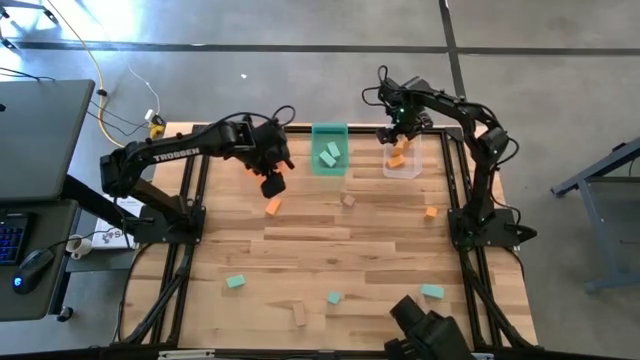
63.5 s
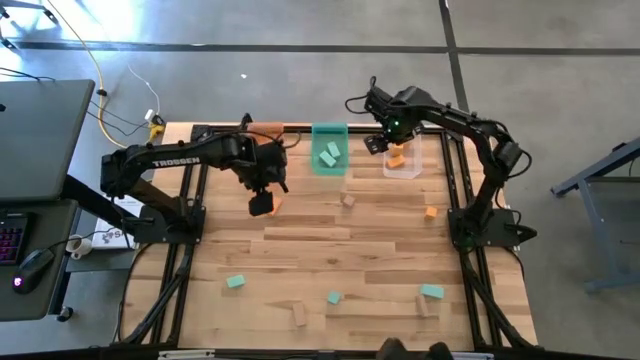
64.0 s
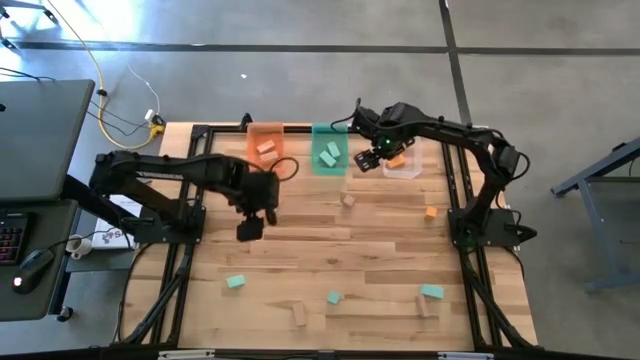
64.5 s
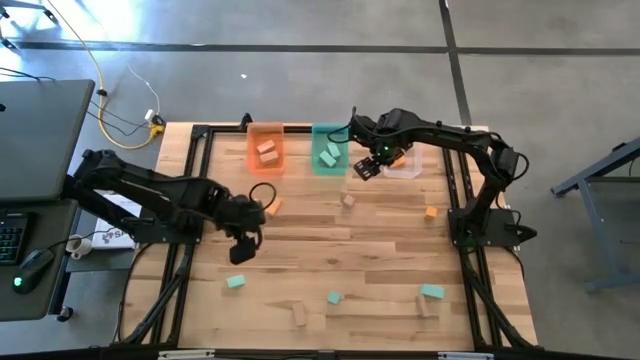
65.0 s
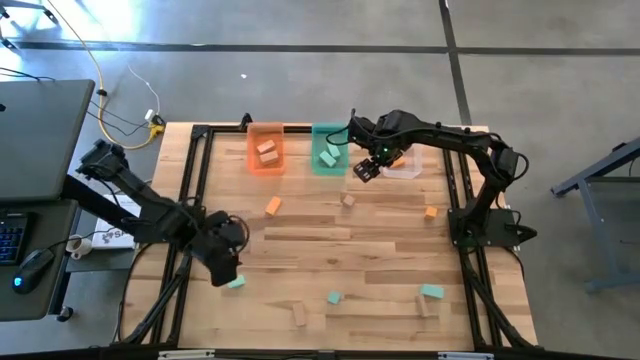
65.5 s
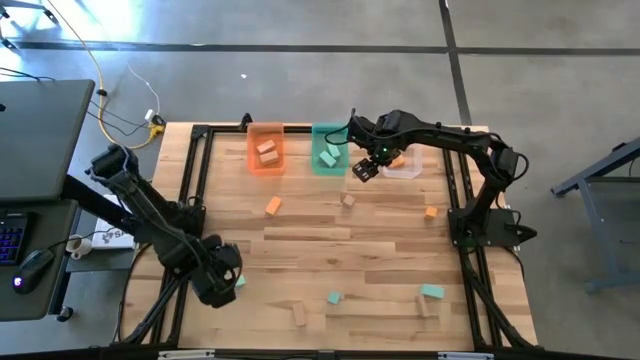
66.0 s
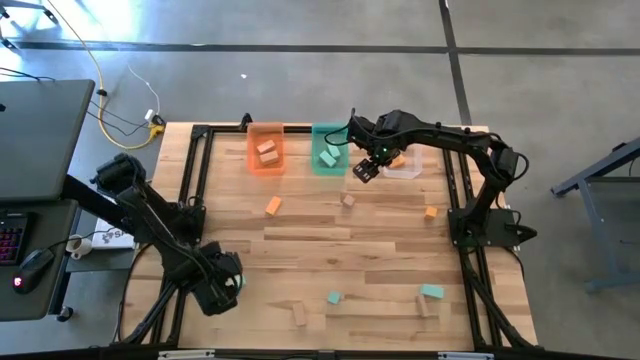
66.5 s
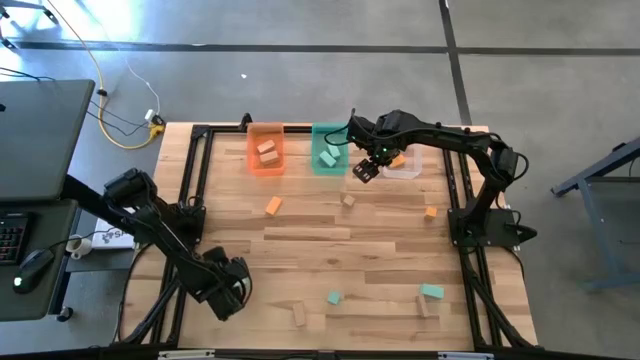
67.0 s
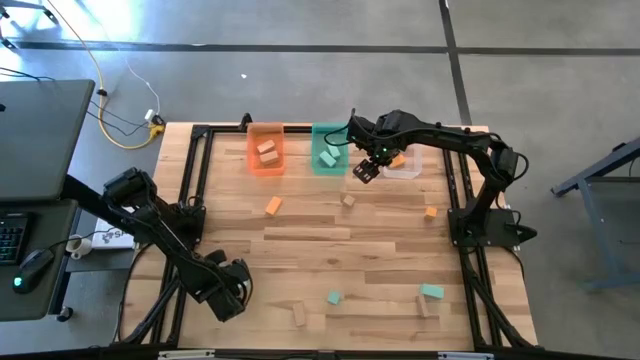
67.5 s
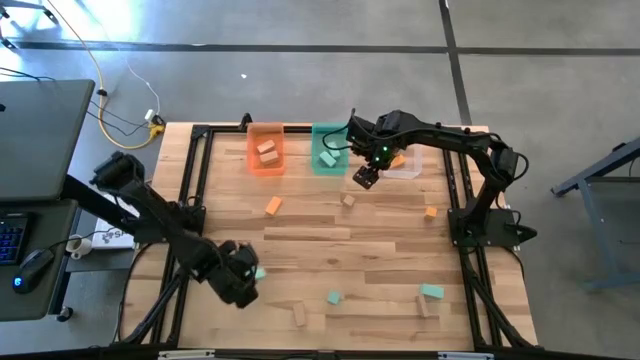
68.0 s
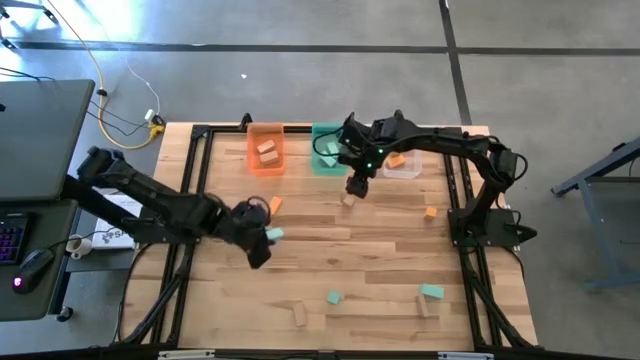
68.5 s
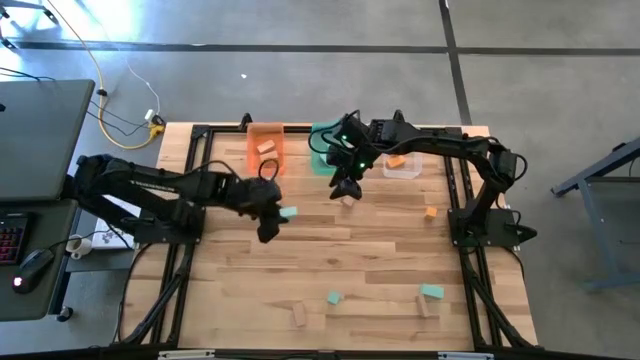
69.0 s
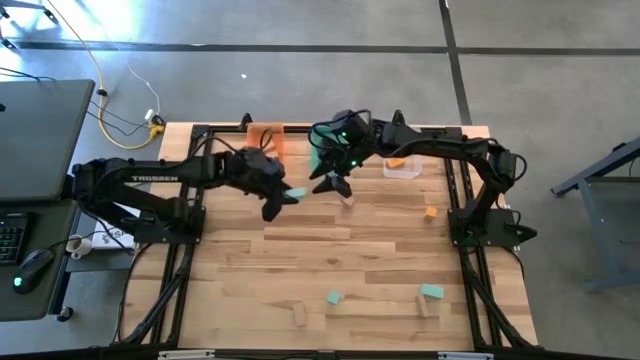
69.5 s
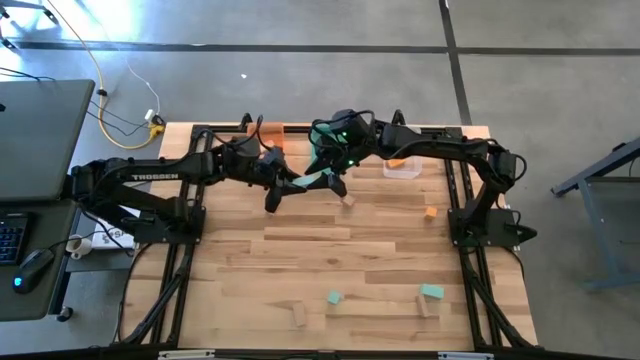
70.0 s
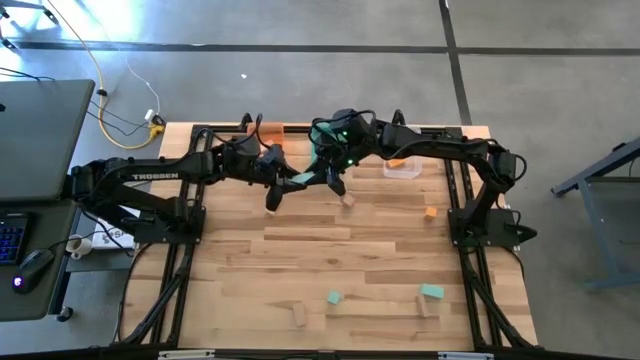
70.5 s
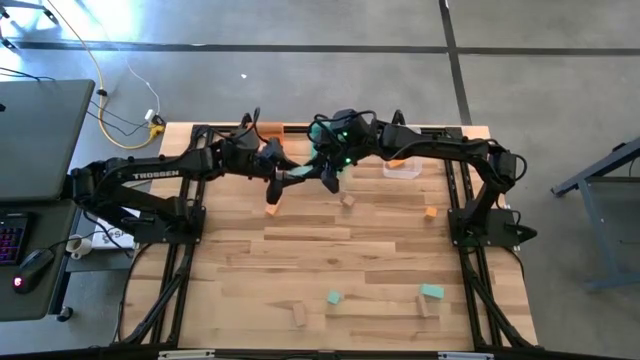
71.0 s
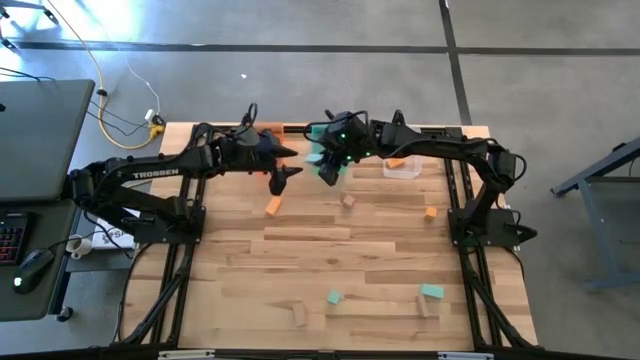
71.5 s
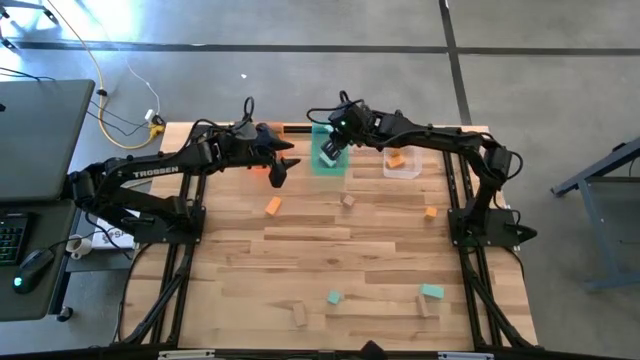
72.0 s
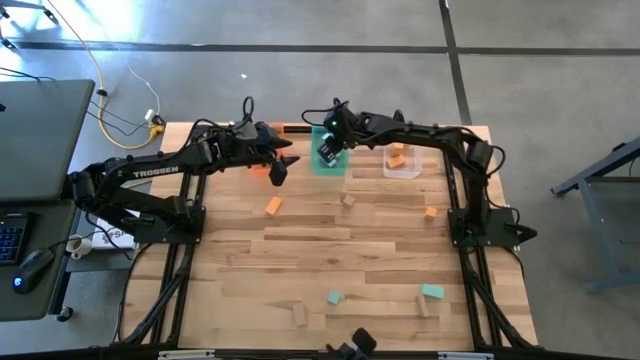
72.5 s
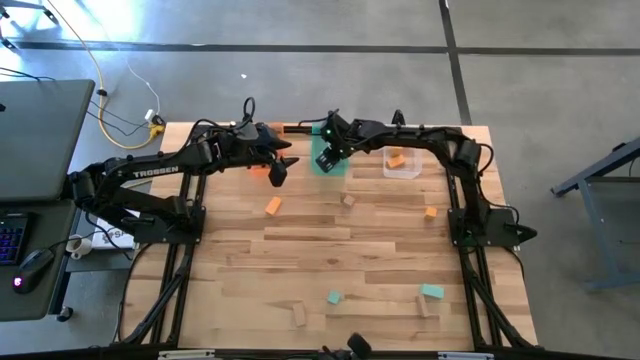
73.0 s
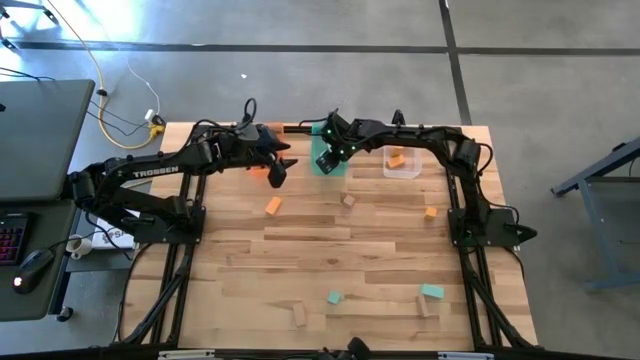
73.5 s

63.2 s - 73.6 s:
Task: Sort & place blocks by color
Put the blue block into the blue bin

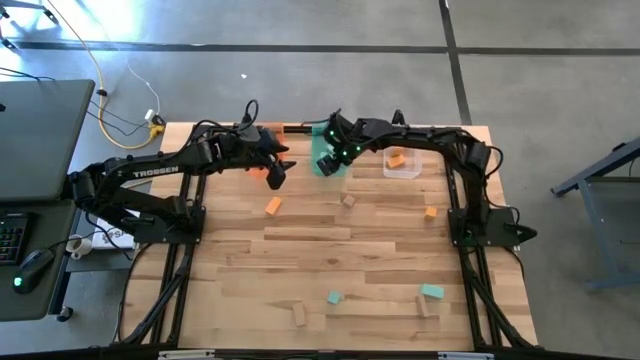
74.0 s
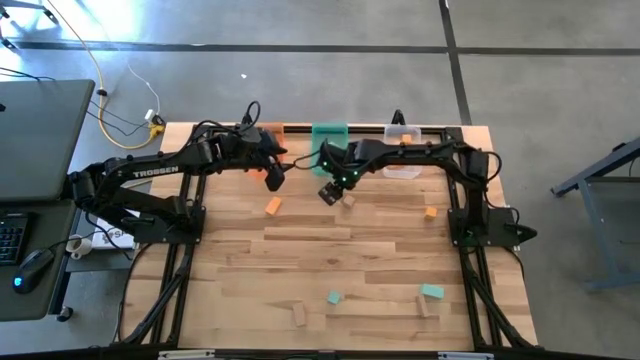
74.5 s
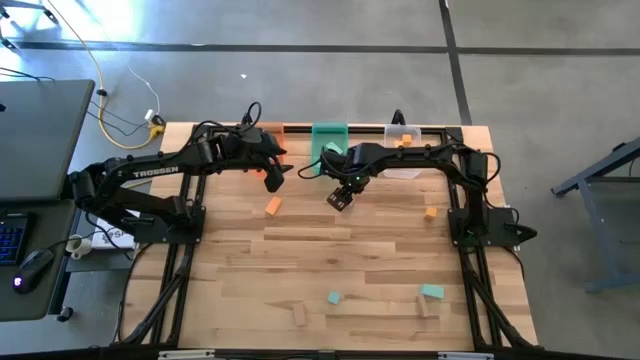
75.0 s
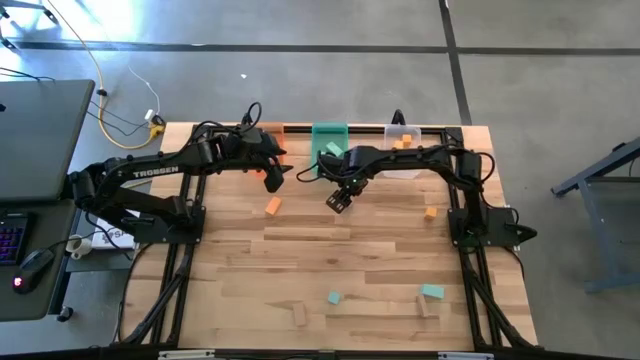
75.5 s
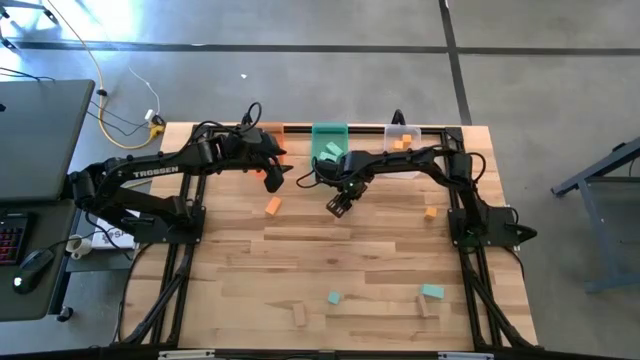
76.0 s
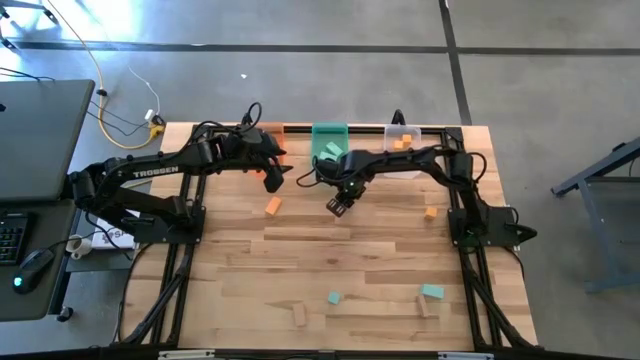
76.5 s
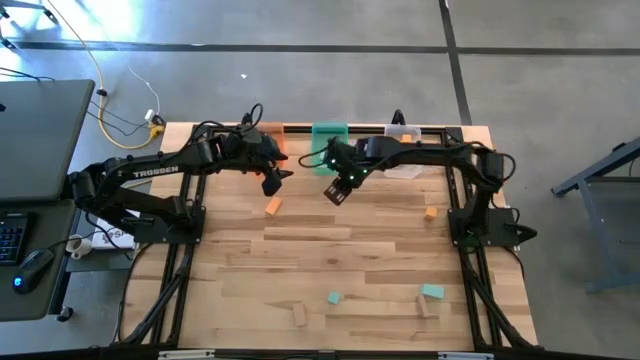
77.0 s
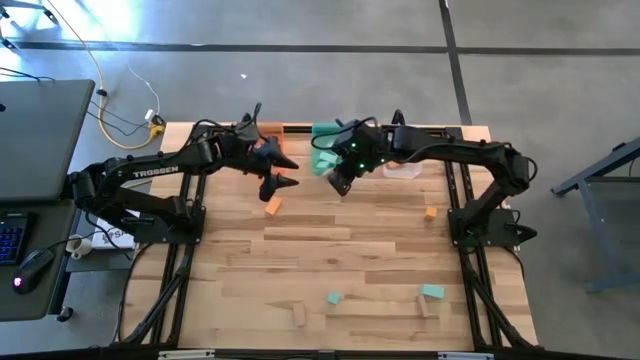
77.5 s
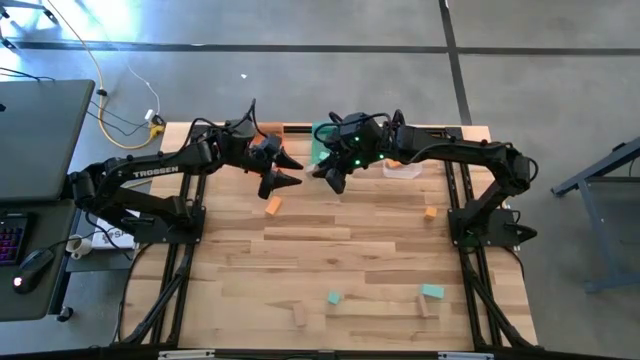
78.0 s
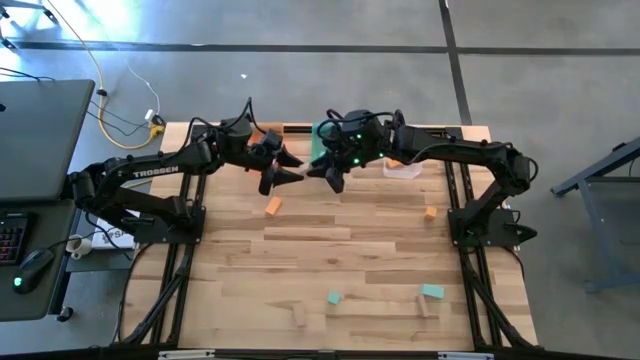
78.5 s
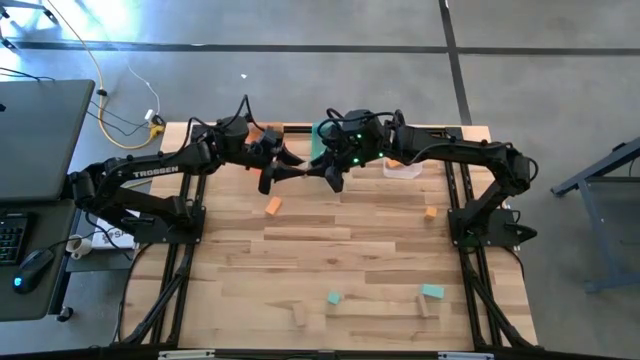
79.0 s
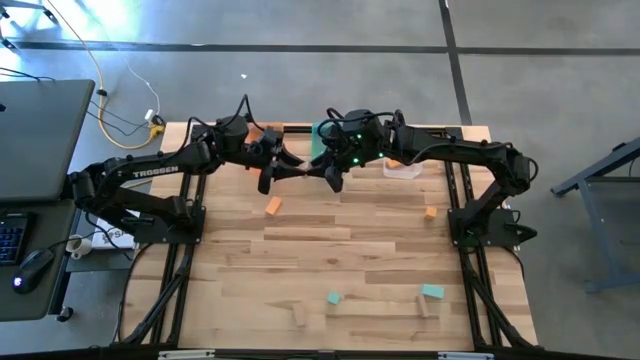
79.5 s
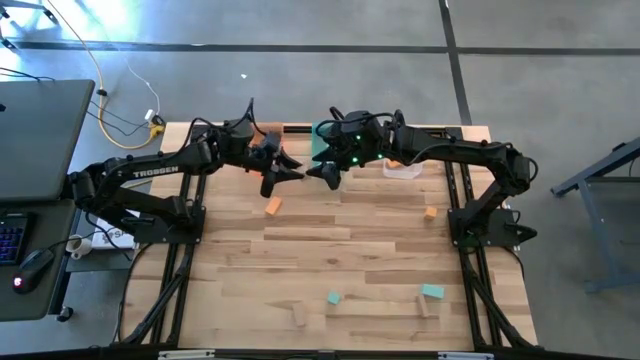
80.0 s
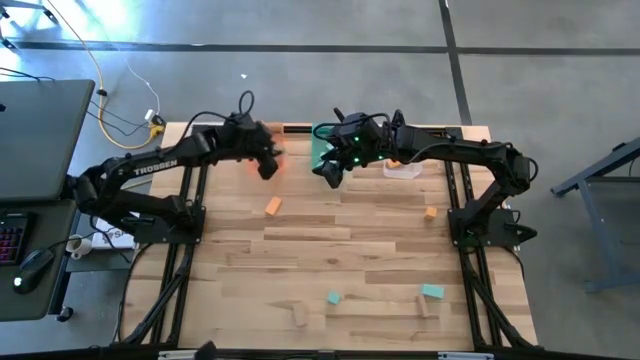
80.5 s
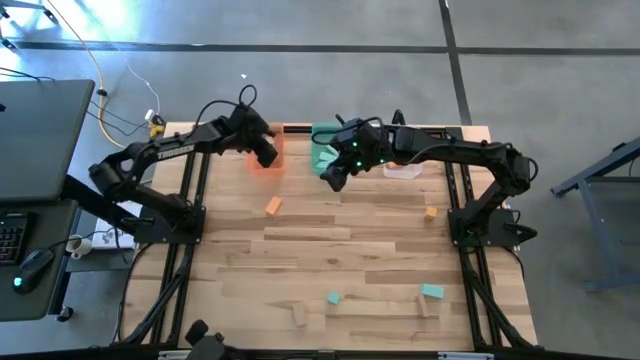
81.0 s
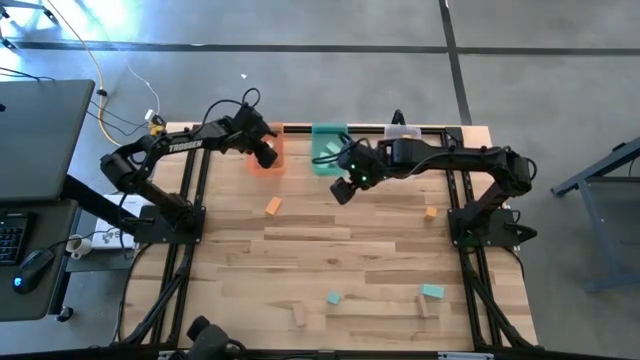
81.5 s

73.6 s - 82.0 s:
Put the brown block into the orange bin

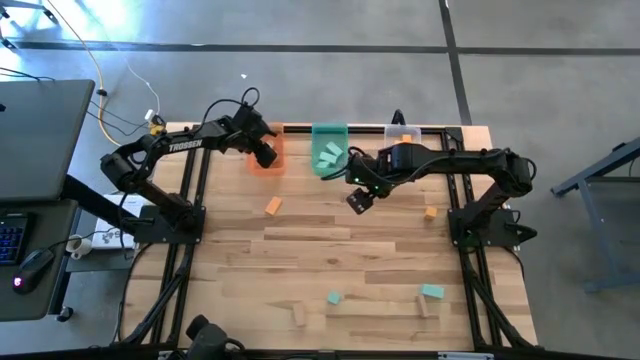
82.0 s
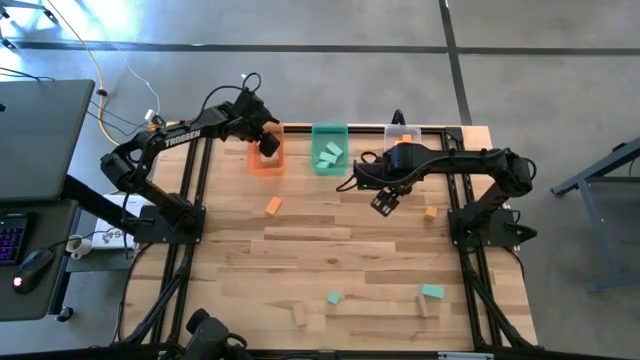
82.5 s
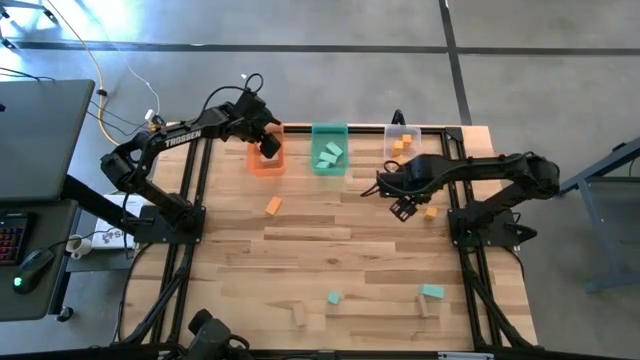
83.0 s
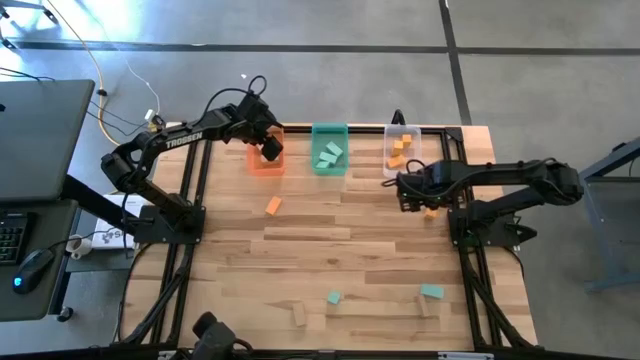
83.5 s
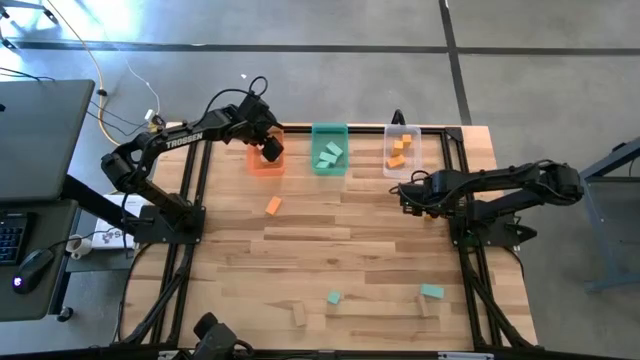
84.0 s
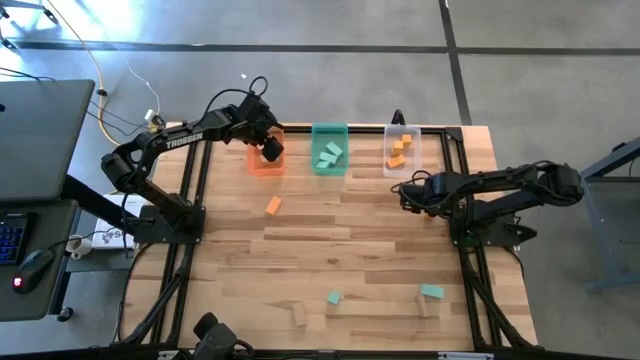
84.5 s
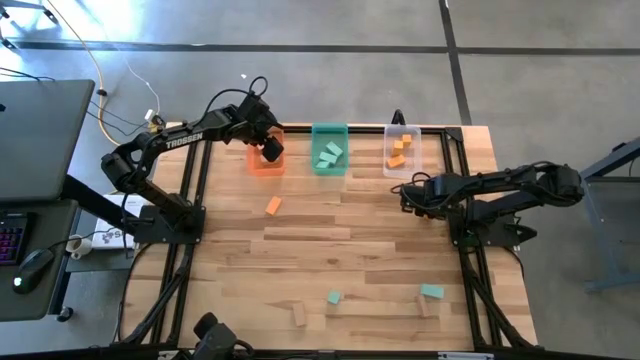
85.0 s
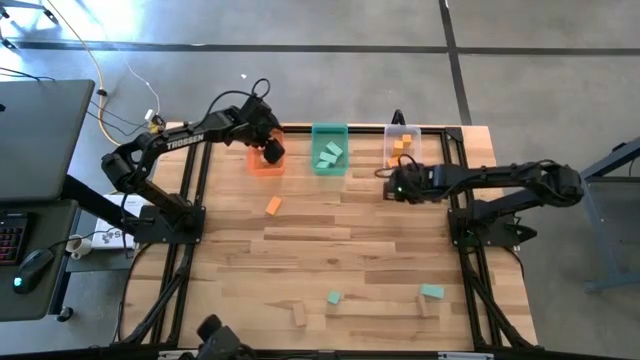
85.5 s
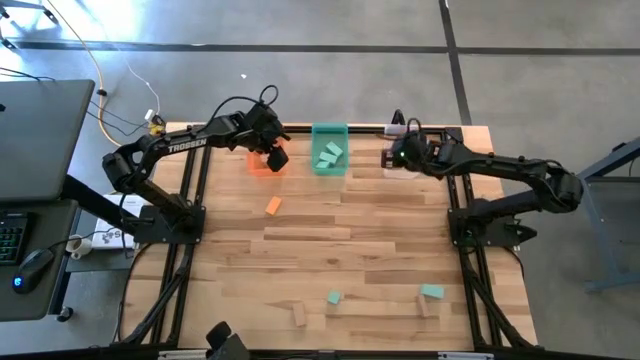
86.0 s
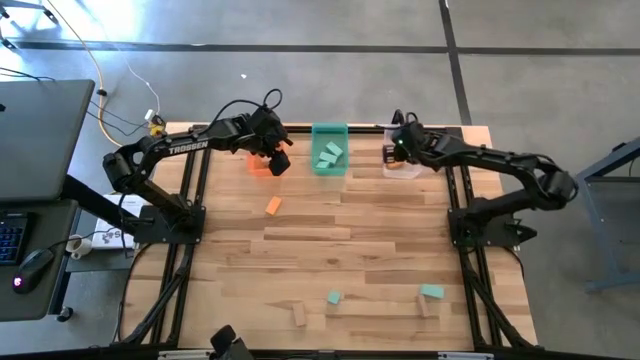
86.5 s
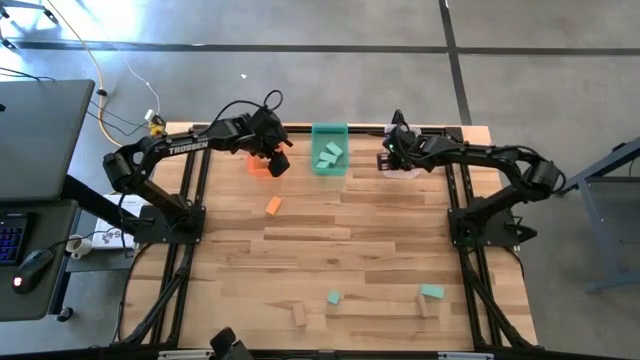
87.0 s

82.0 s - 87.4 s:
Put the yellow block into the transparent bin
